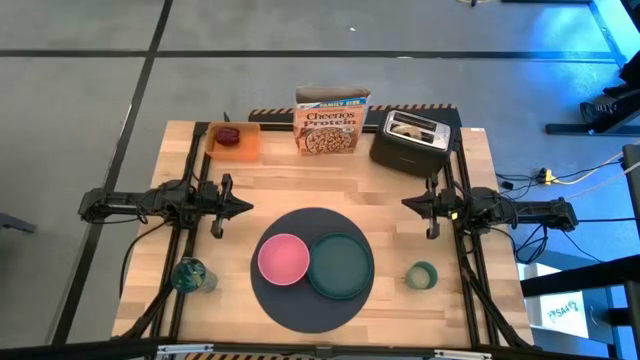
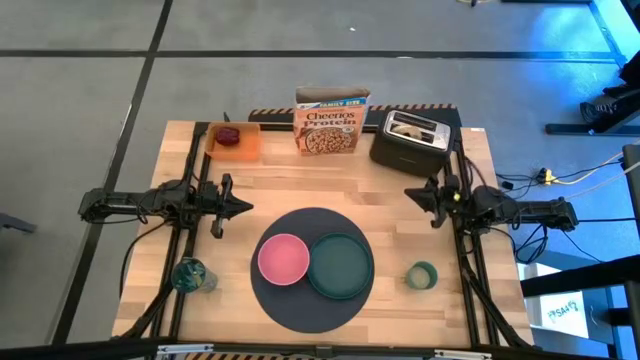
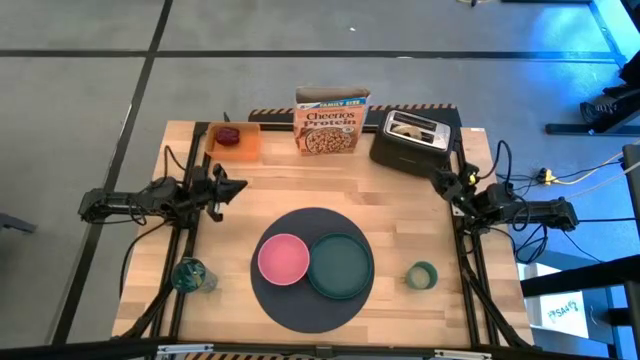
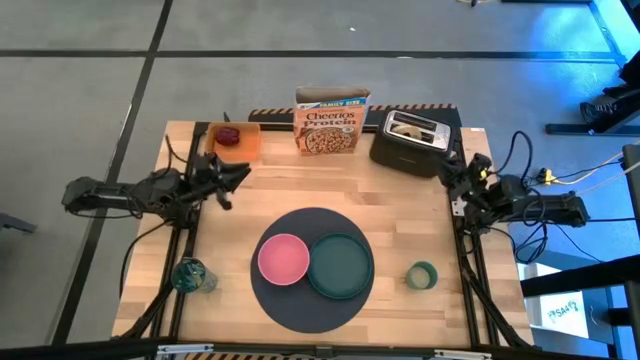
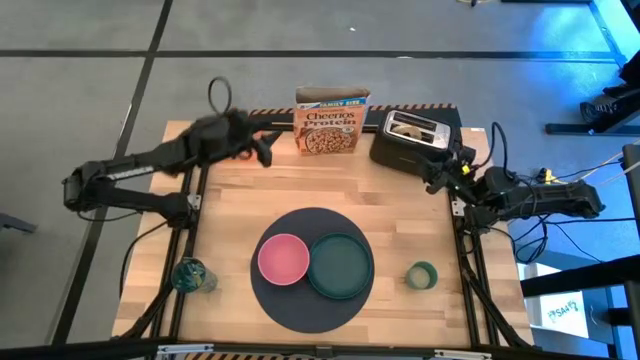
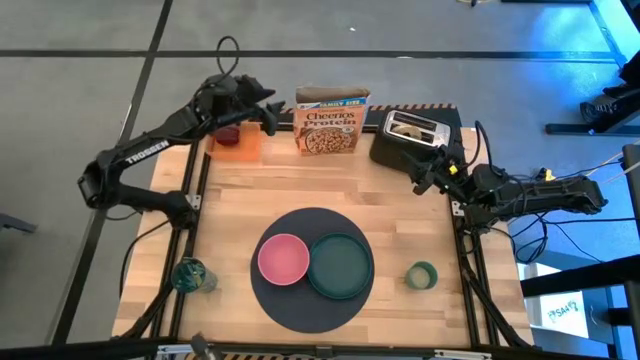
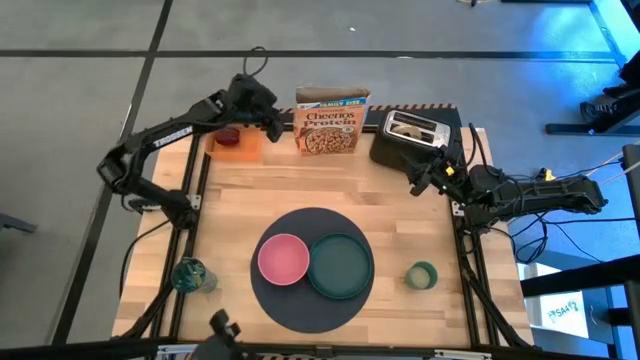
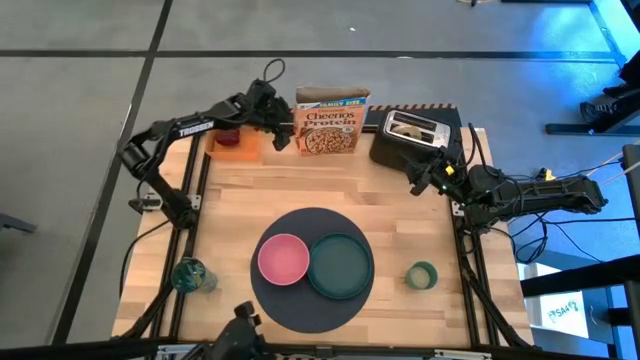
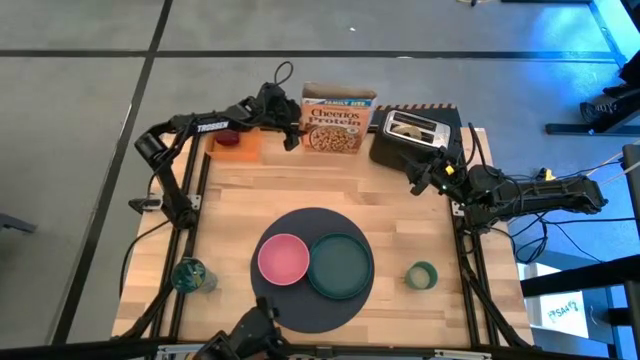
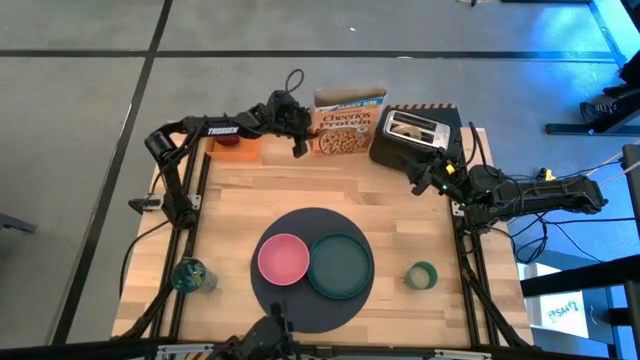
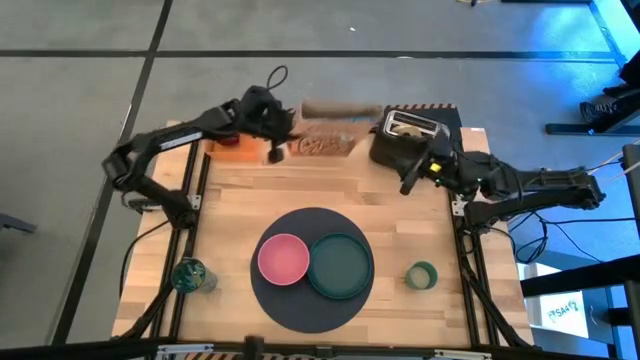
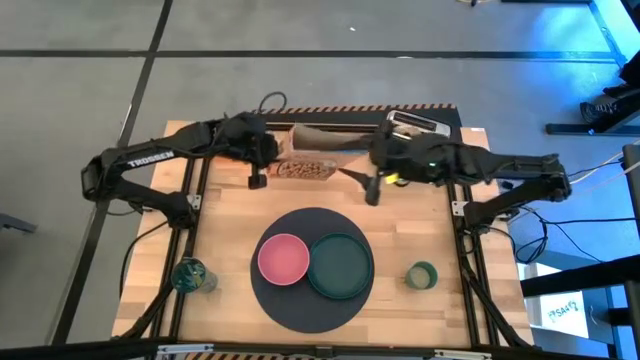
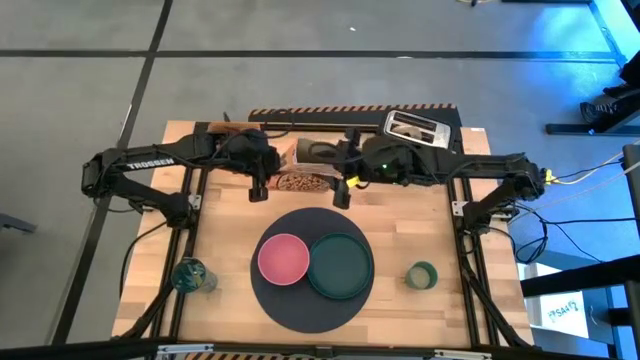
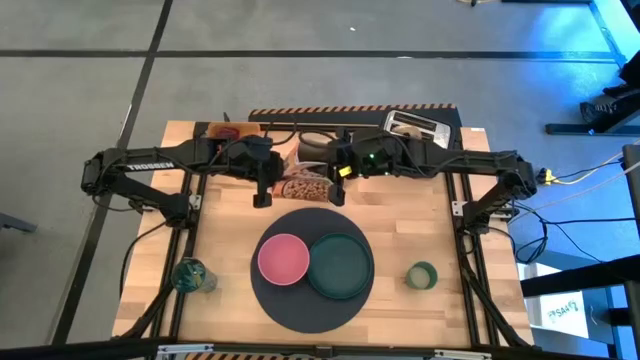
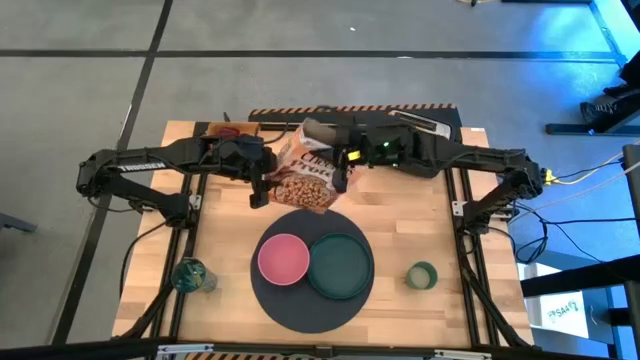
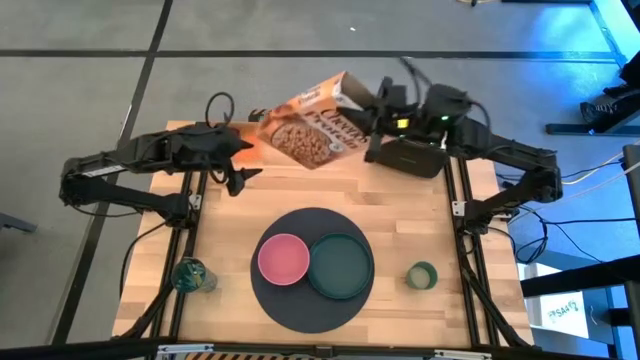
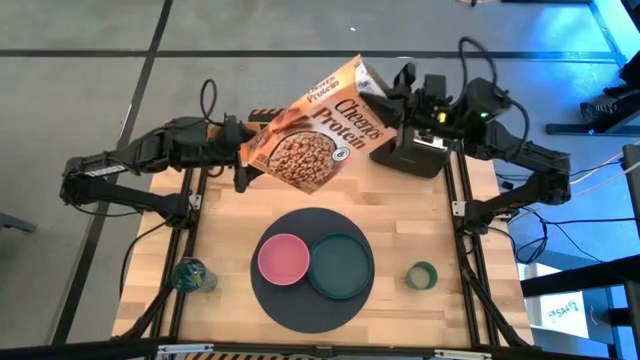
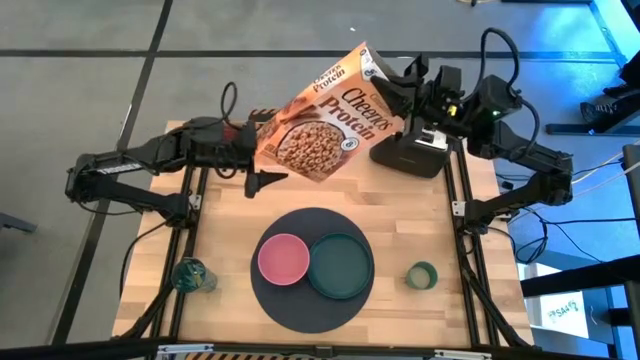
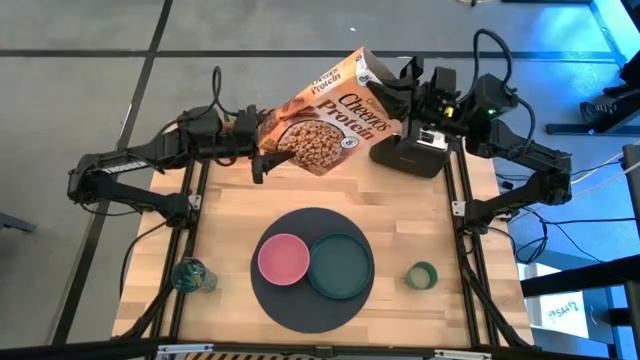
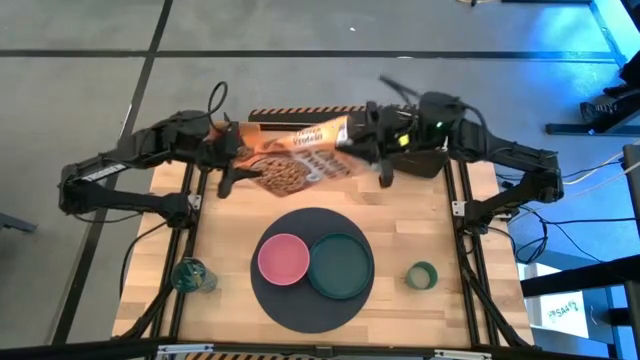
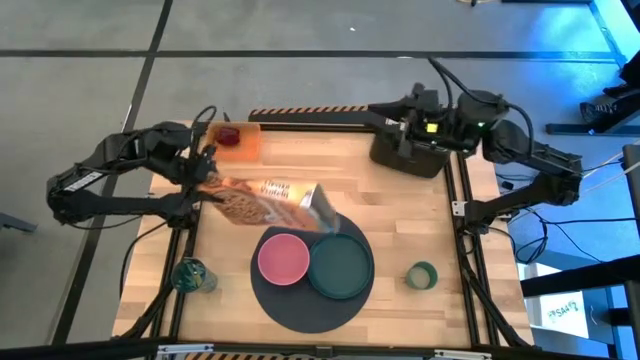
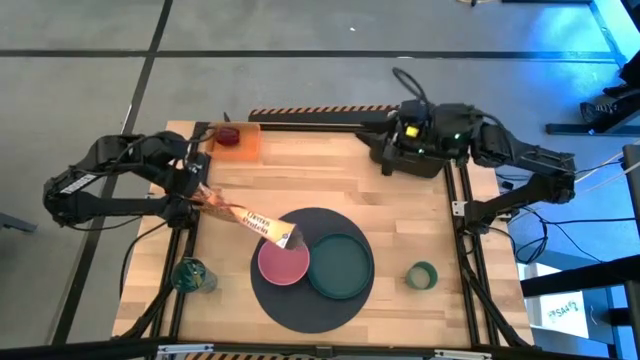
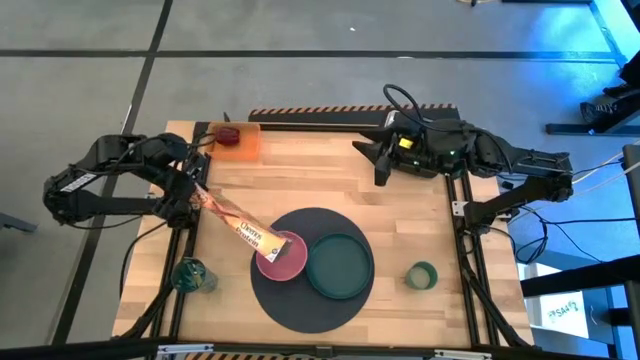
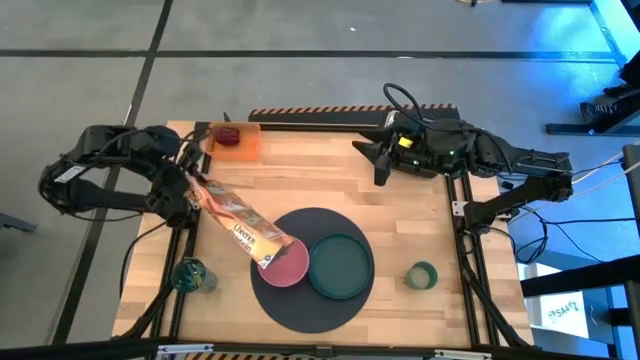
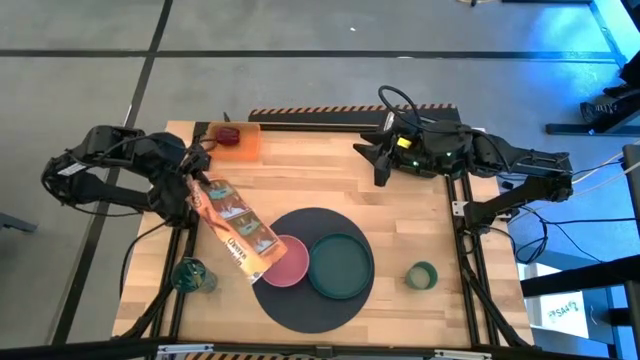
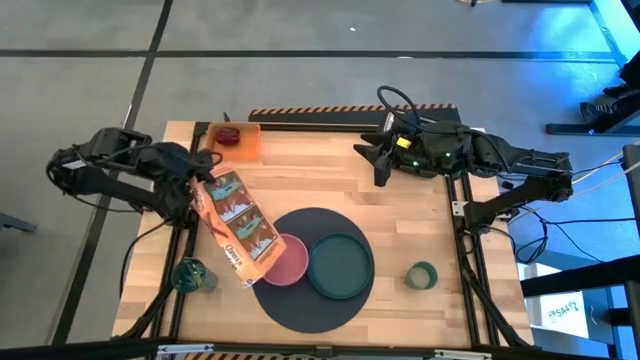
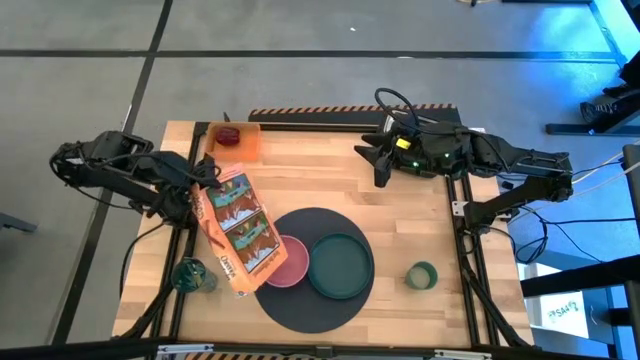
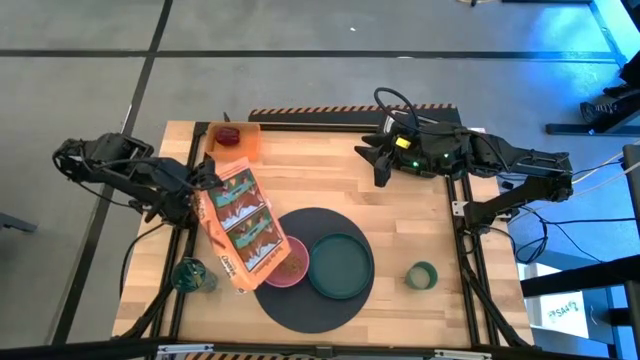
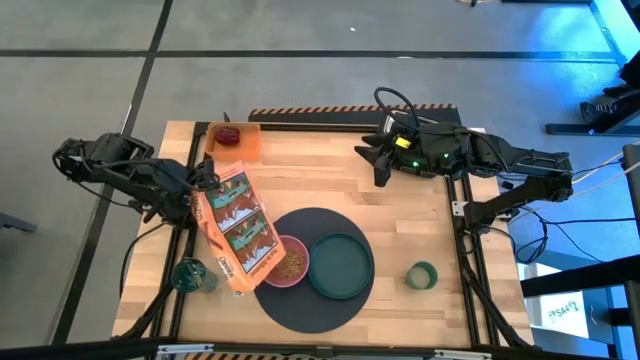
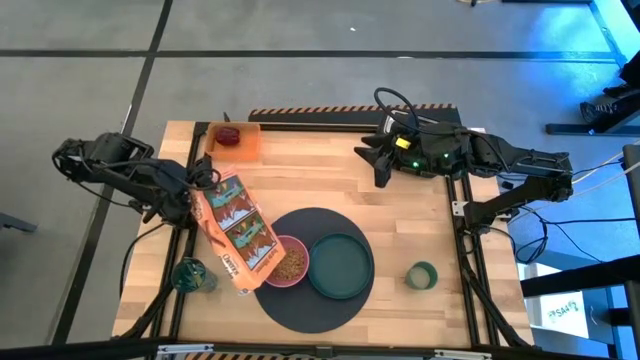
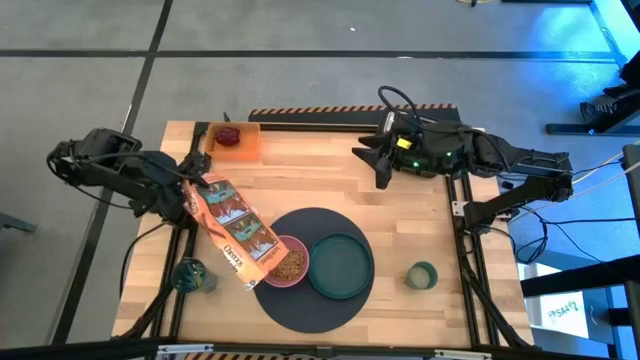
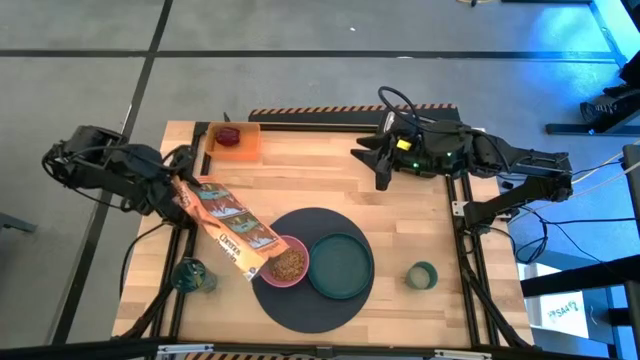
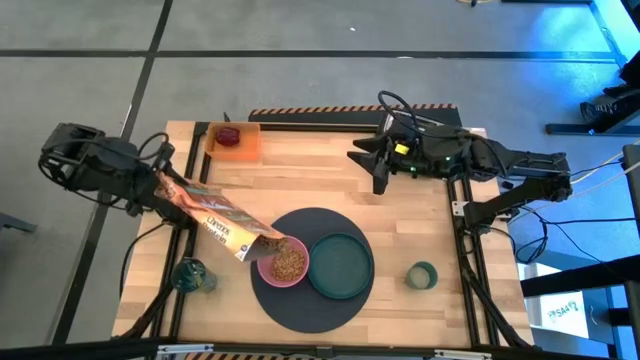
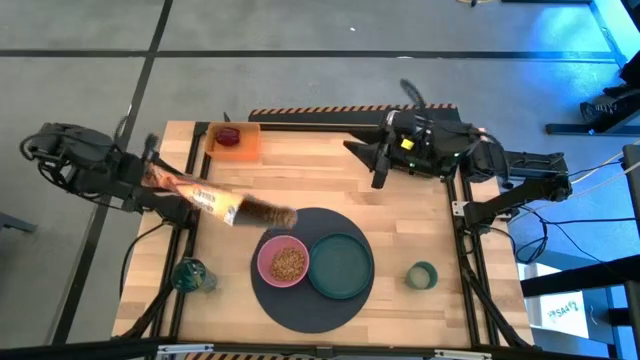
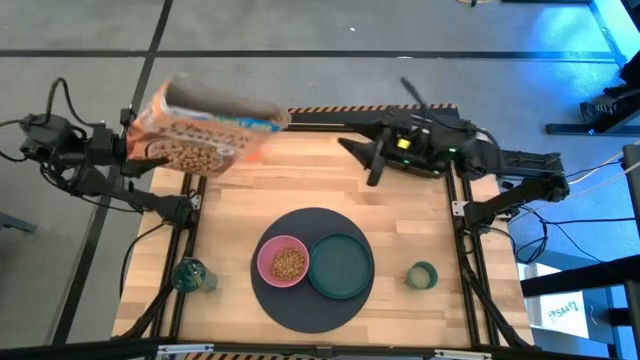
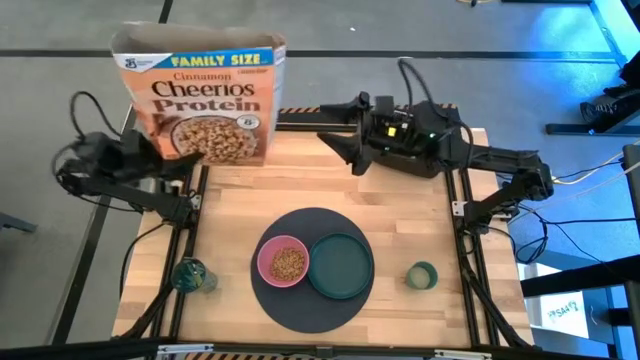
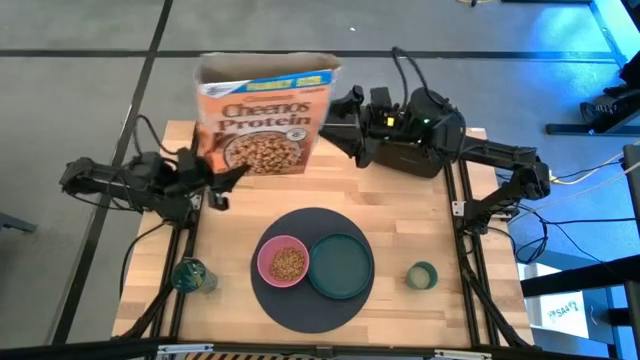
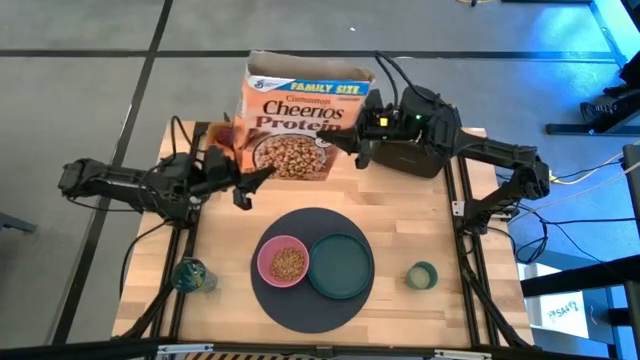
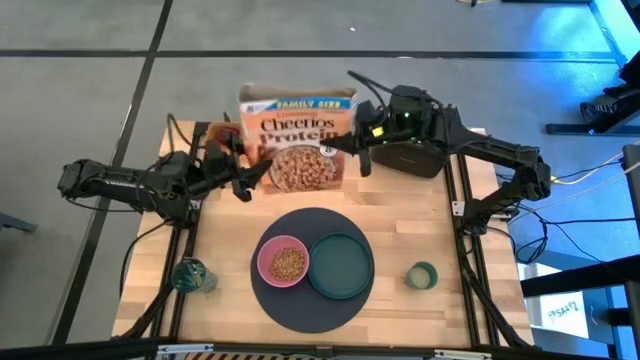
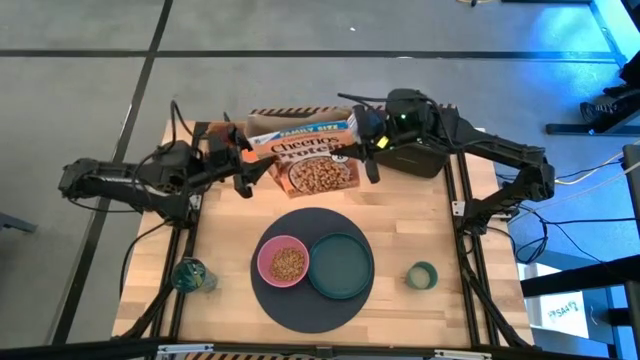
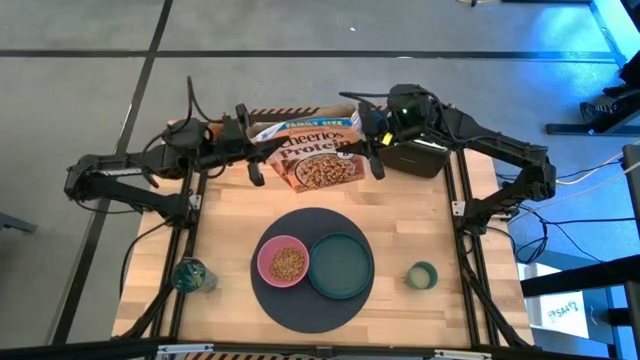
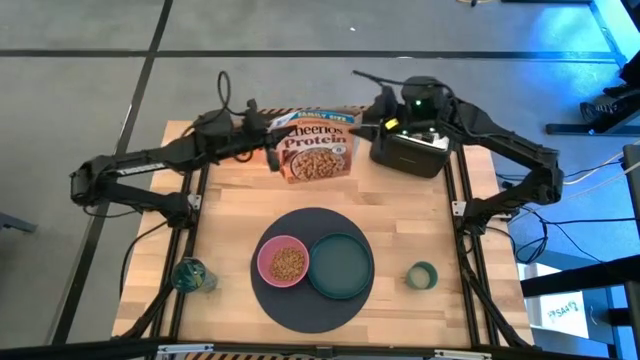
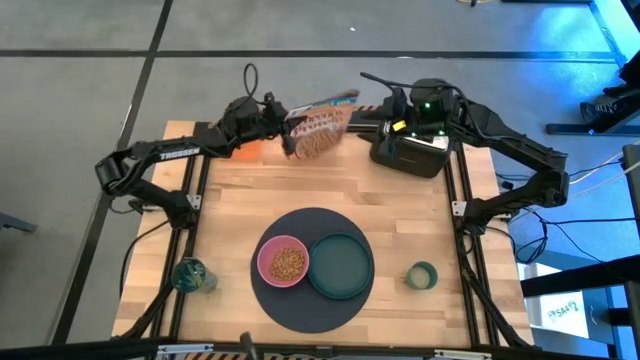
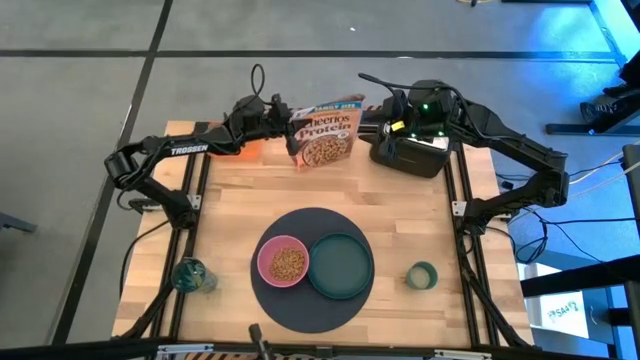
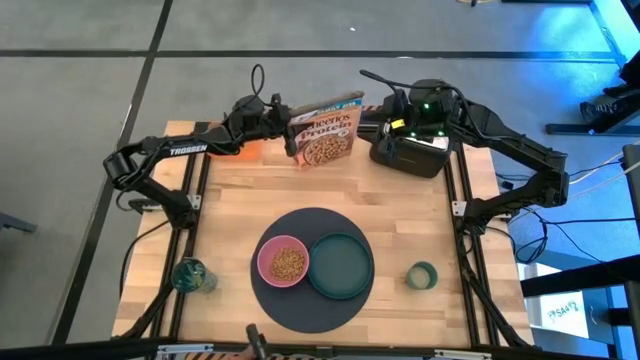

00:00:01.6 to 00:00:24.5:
Task: Arrange a breakfast setting
Pour the cereal from the cereal box into the pink bowl
